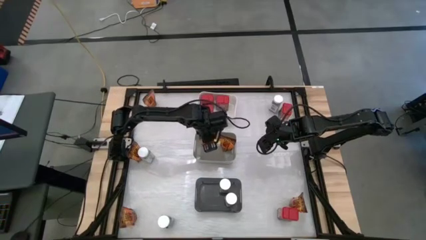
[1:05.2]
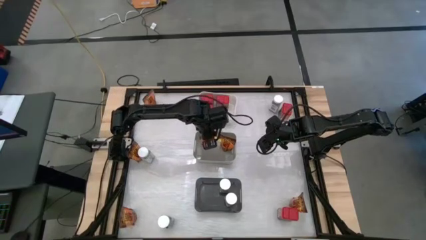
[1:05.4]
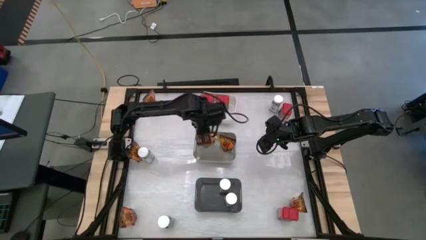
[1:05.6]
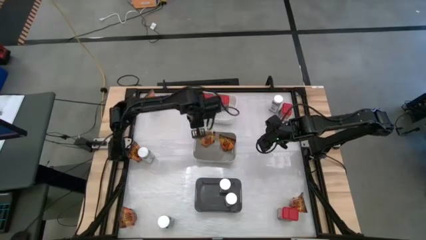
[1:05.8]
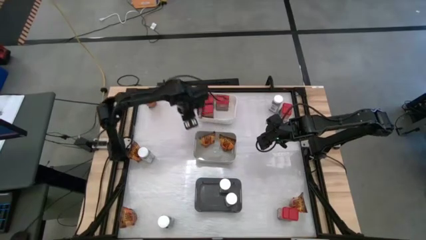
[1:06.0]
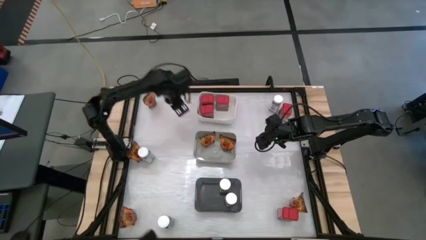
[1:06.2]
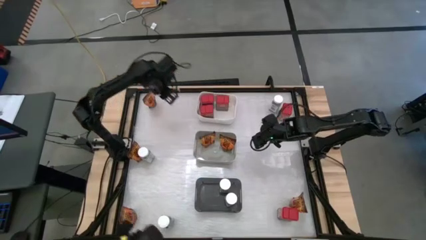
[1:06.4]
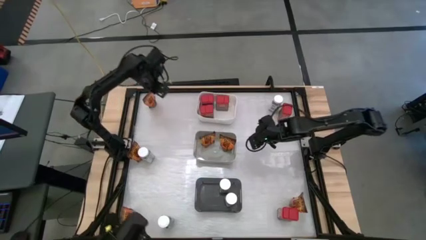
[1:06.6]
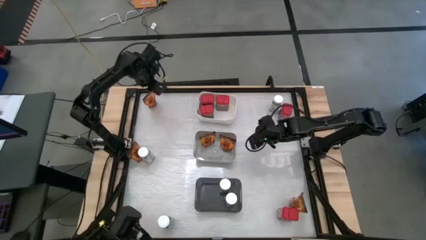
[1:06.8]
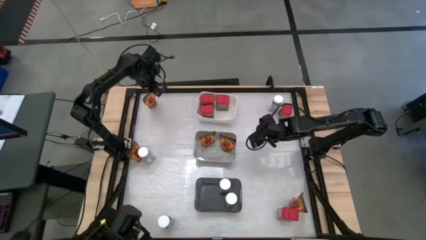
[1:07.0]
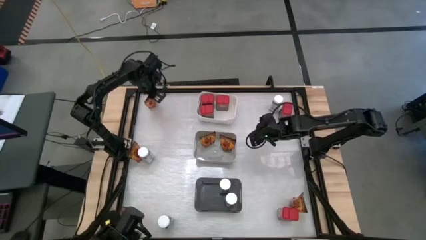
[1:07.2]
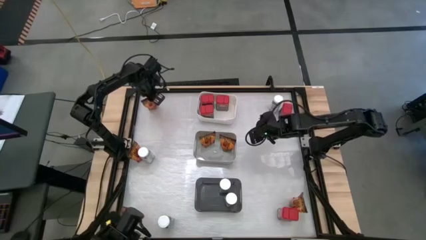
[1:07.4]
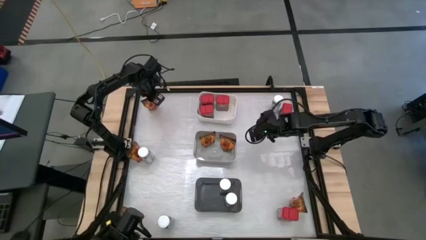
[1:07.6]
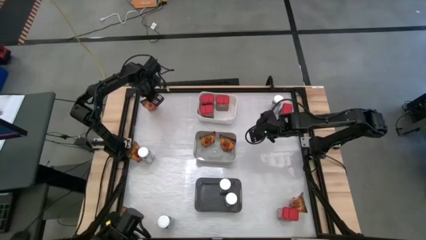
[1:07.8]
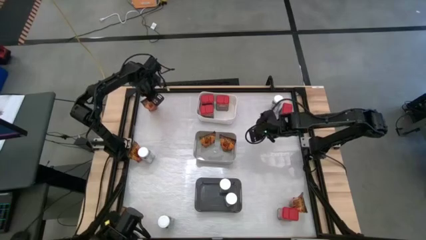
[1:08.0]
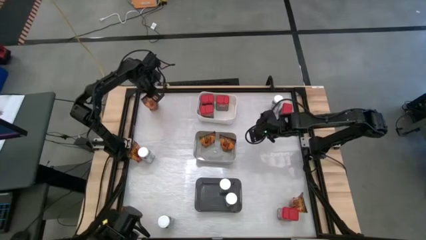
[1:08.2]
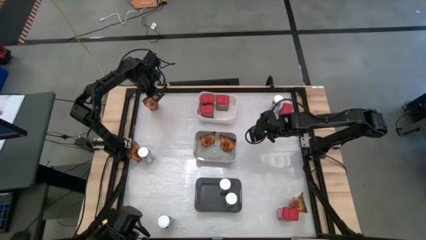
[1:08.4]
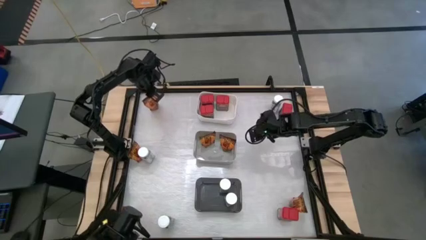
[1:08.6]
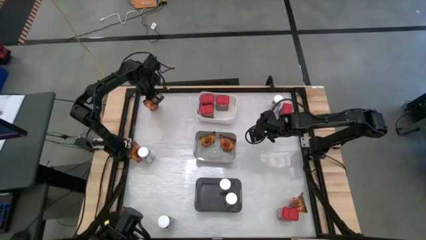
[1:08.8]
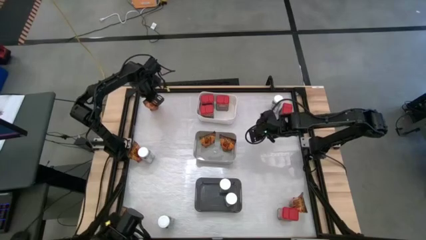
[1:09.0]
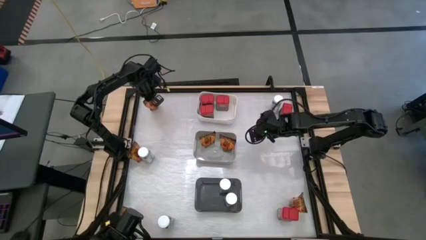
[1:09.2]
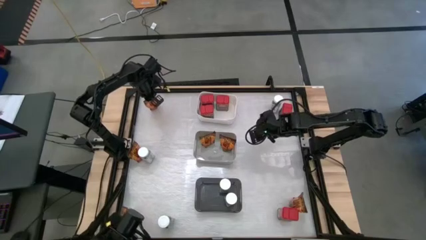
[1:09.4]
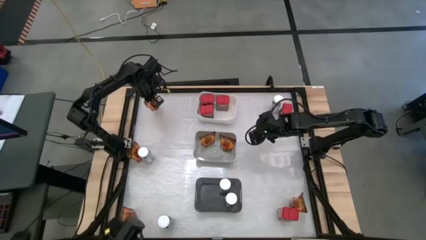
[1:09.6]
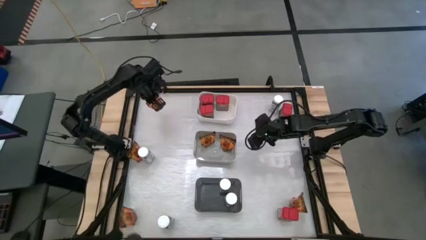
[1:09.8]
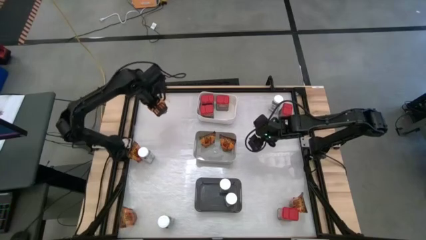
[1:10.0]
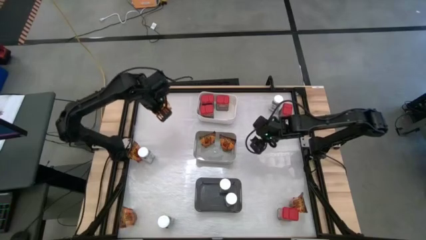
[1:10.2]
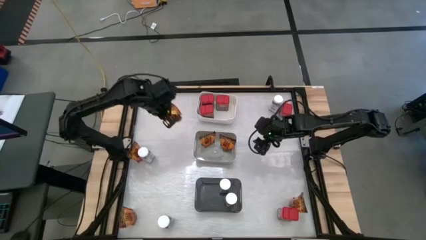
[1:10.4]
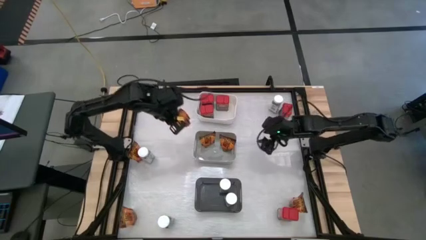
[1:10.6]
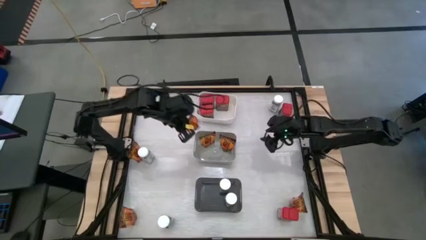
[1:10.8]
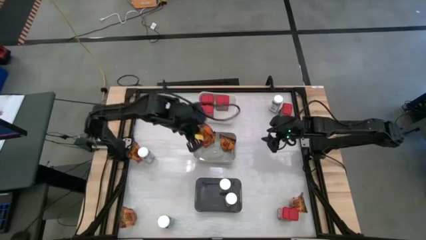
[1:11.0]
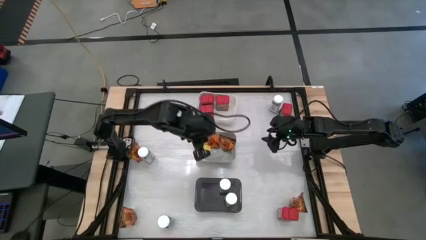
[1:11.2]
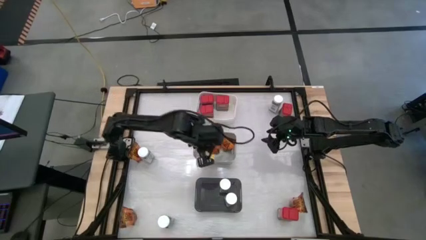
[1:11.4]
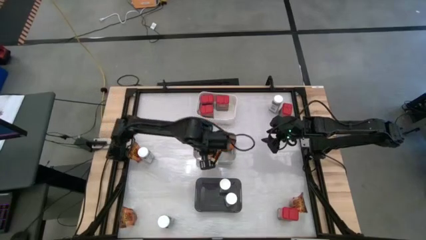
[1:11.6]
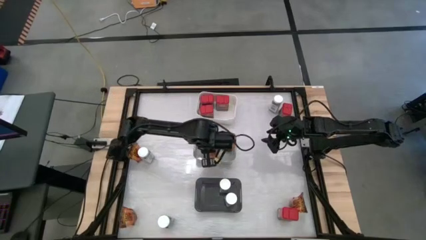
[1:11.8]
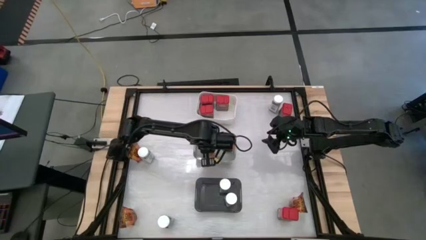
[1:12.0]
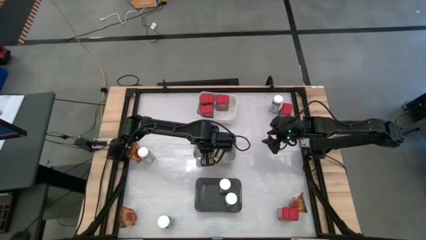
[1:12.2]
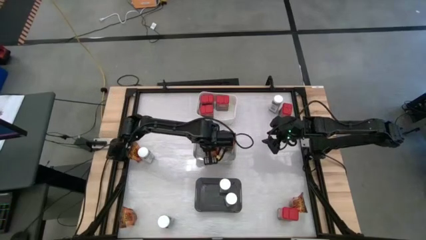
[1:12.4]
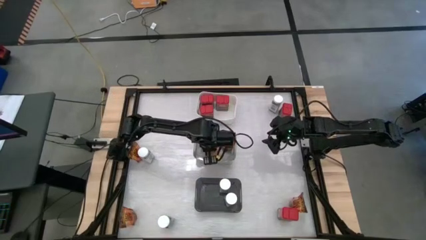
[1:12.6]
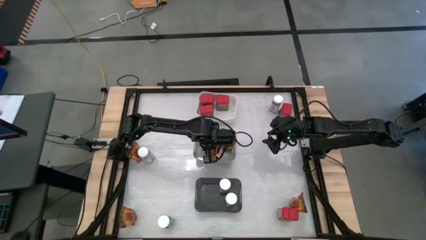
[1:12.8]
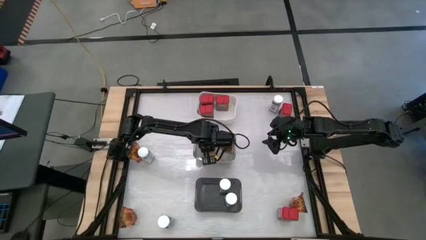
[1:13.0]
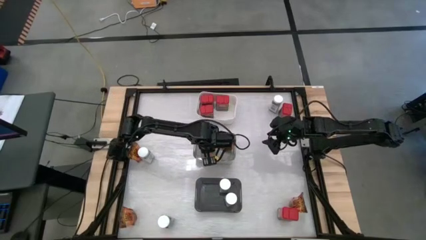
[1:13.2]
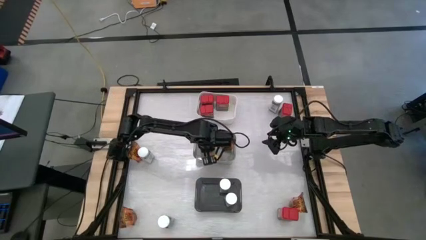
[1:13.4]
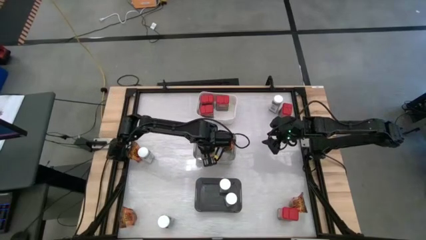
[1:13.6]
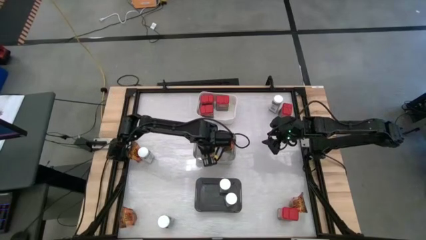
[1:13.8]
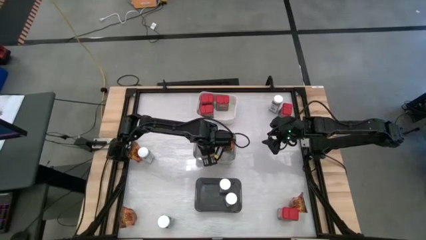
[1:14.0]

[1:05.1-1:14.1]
Task: Sort spices by type
Put the orange seasoning bag into the gray bin

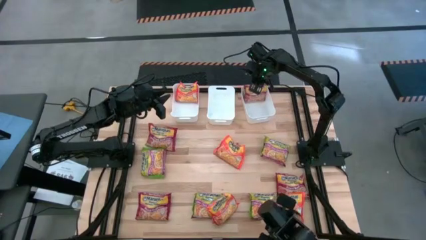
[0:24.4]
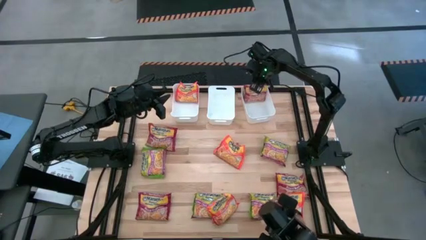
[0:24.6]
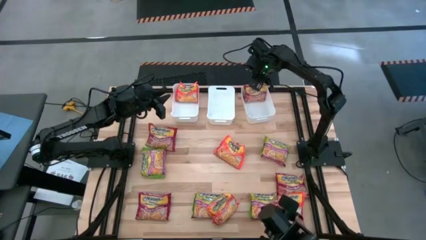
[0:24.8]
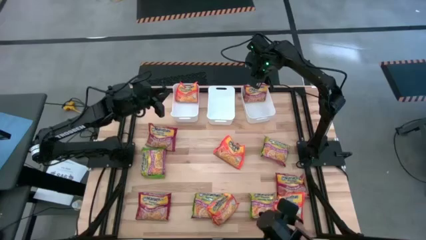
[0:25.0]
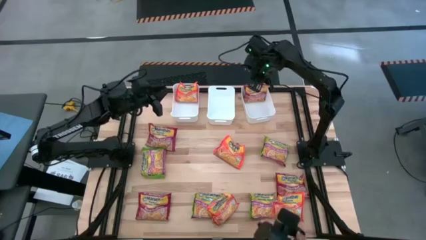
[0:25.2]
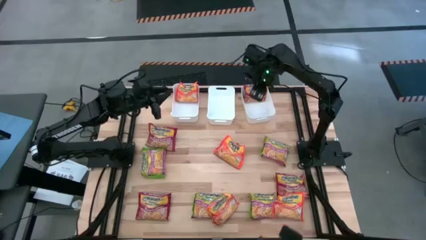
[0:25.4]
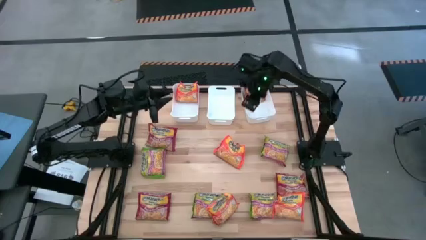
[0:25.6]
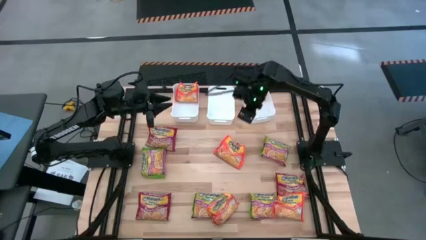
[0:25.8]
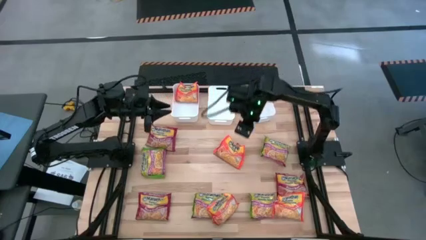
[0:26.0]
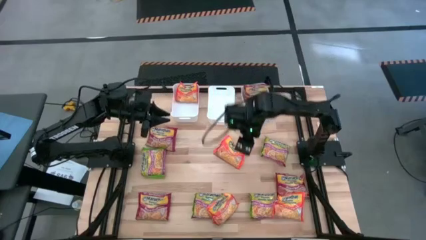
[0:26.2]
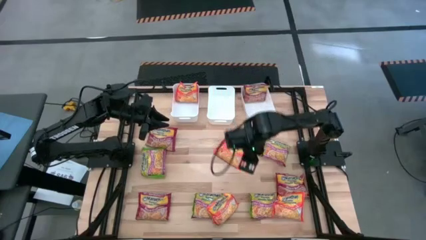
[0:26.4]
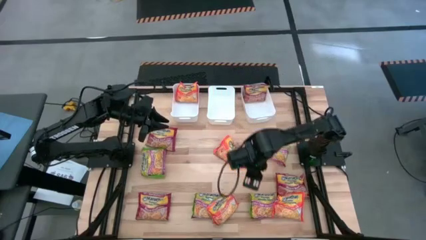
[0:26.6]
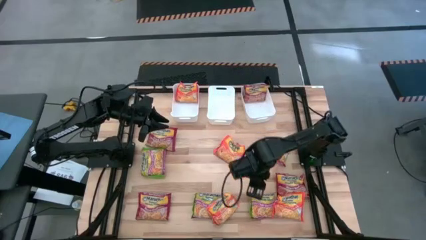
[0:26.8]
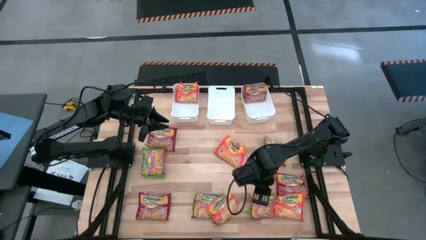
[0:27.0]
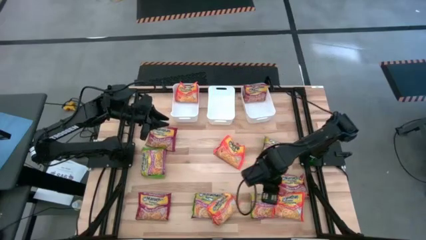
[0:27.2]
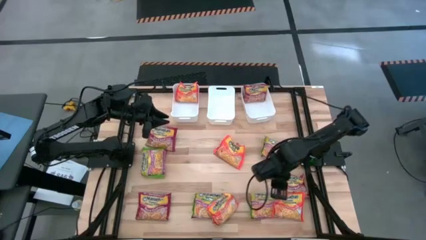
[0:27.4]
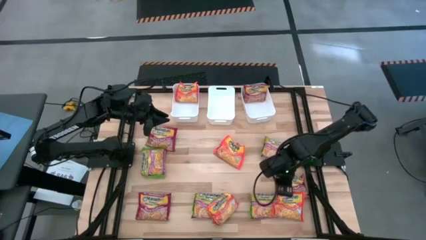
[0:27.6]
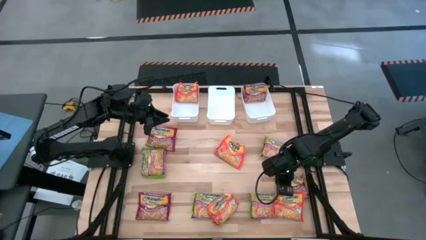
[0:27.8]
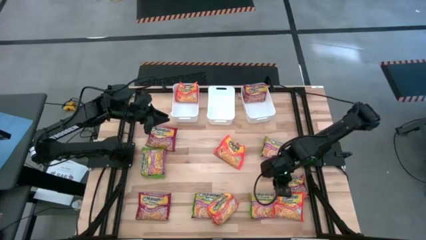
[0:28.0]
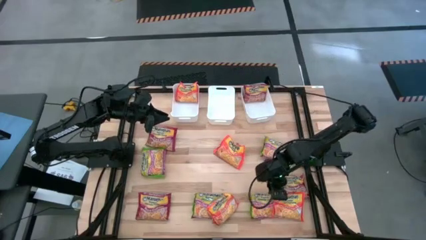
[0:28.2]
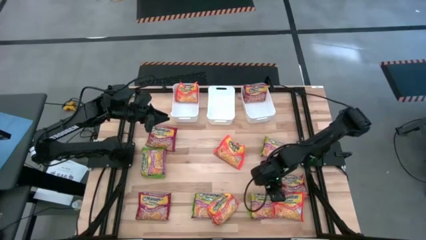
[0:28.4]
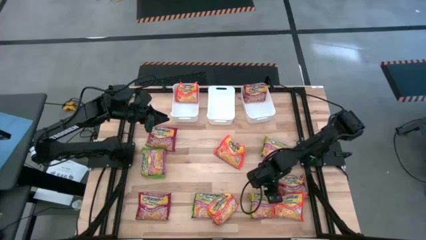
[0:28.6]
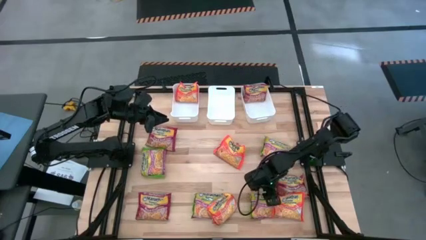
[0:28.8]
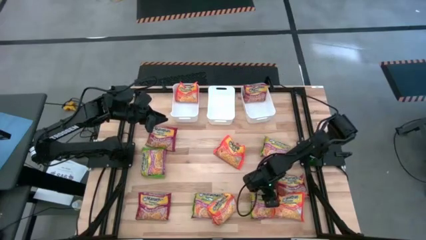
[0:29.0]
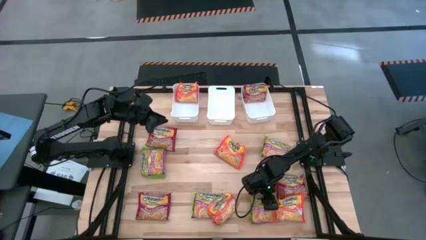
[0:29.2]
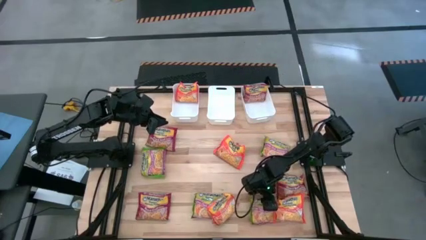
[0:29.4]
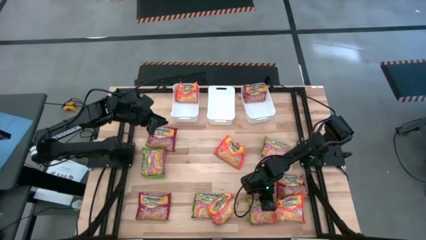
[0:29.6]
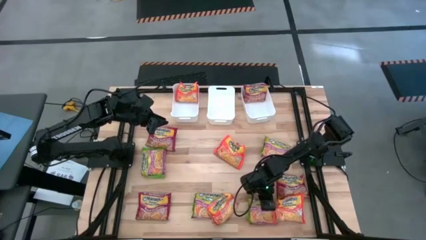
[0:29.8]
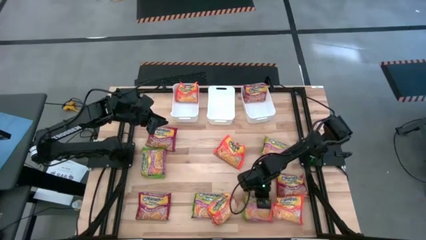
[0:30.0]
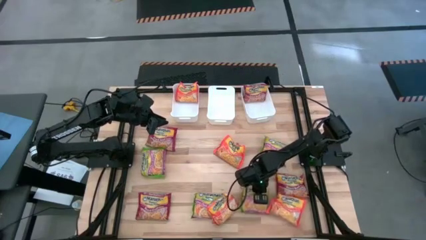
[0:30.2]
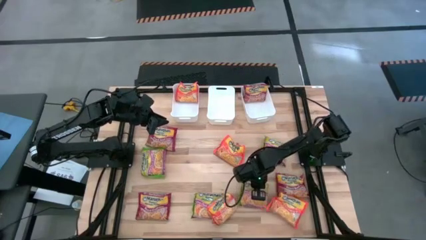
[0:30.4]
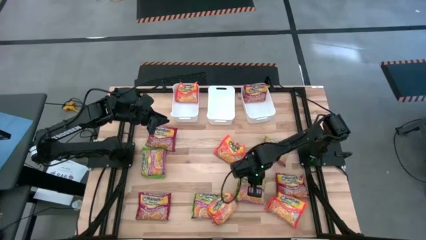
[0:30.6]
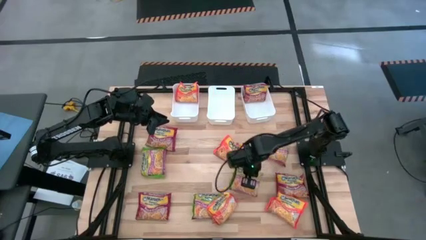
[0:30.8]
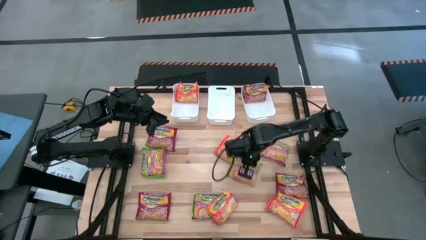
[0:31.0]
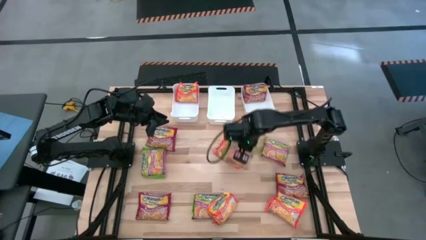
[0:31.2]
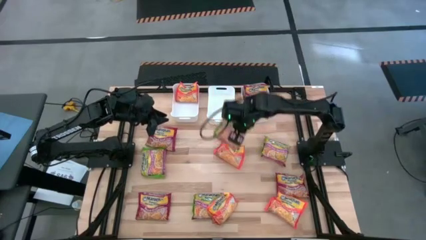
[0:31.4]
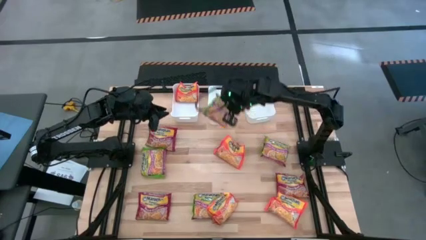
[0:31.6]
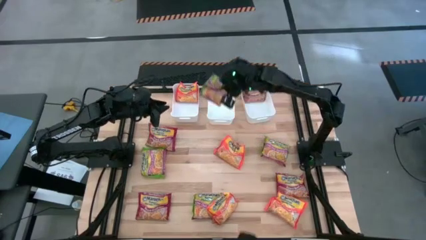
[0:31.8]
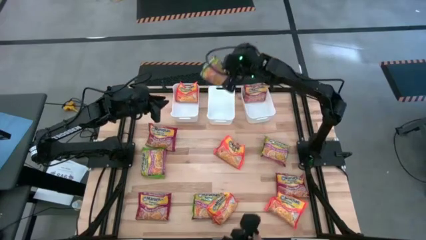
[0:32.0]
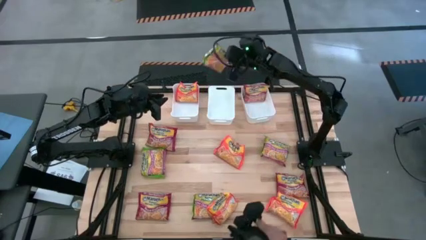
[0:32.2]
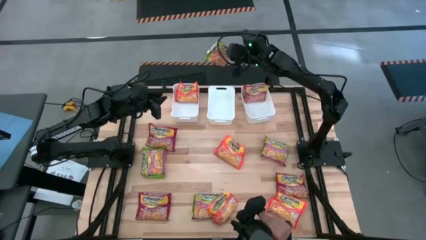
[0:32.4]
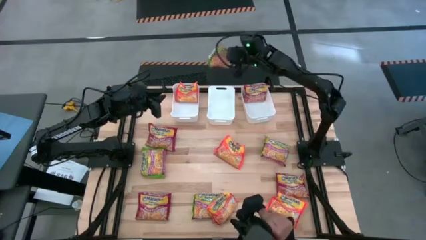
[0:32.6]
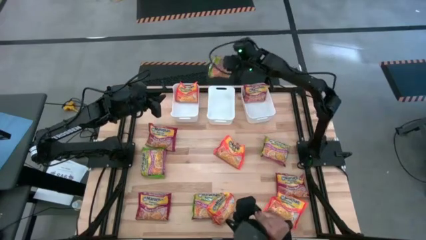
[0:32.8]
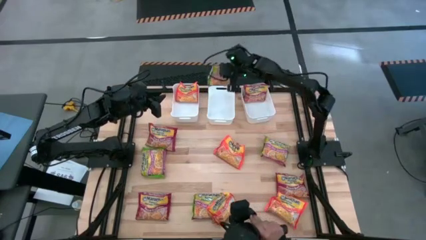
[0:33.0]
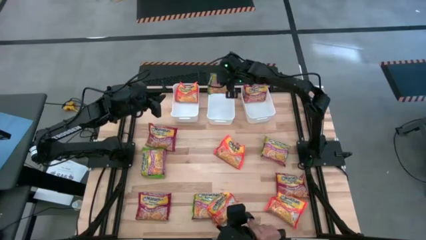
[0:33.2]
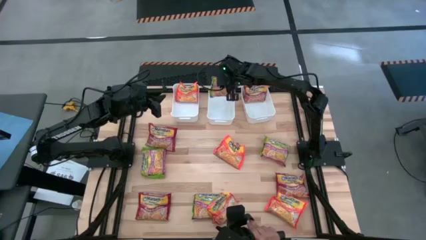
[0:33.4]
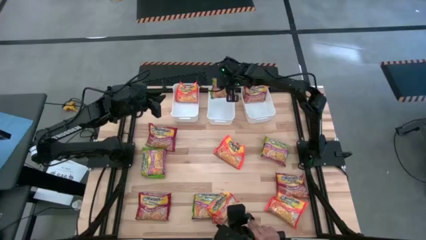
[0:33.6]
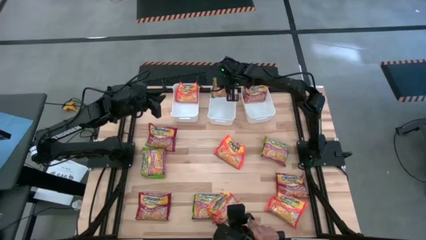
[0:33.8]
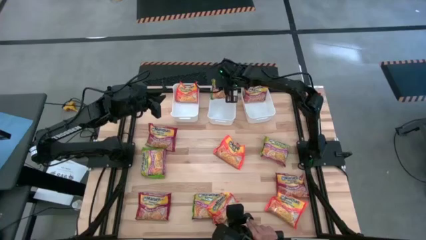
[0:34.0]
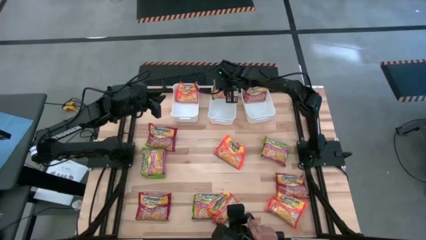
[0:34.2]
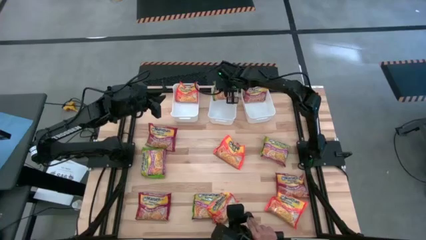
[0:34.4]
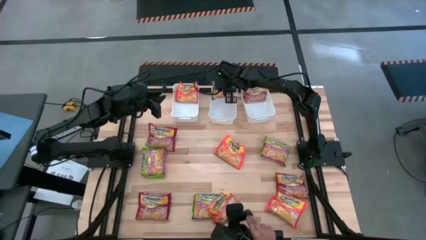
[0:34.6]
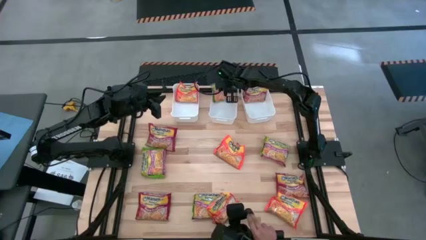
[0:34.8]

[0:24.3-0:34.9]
Task: Sort Maruchan noodles
Put the green noodle pack into the center white bin
